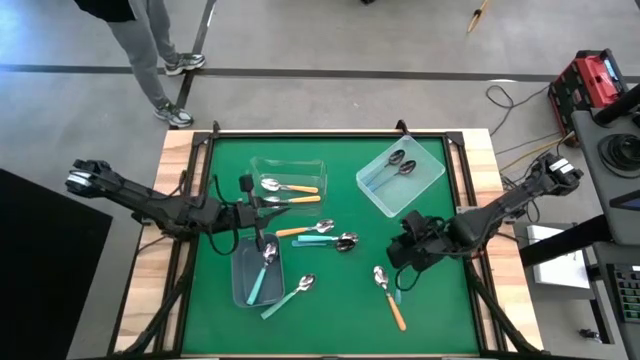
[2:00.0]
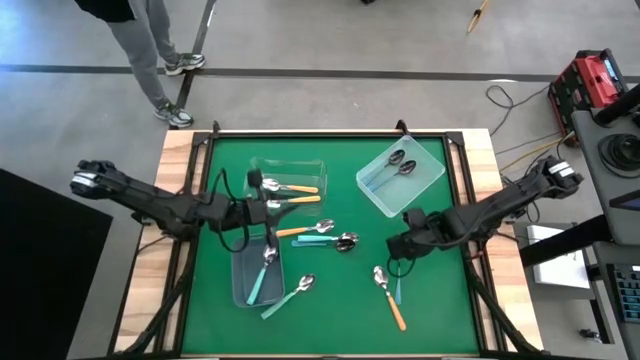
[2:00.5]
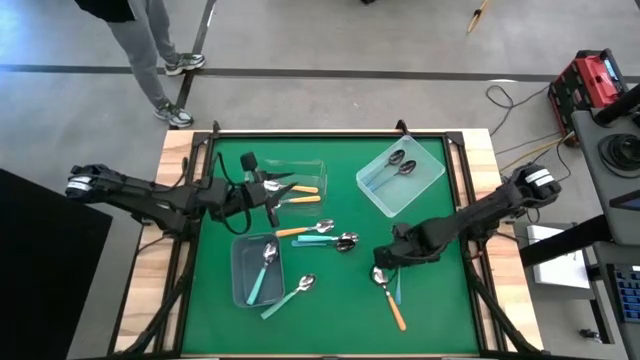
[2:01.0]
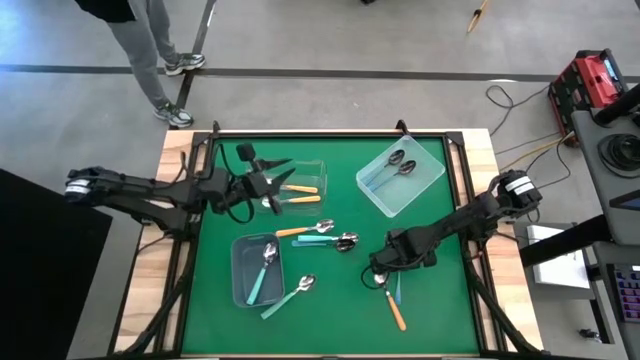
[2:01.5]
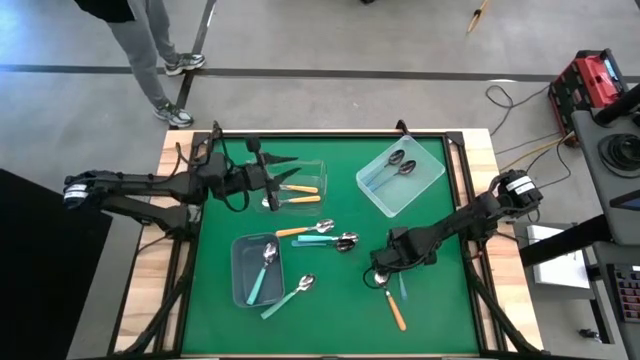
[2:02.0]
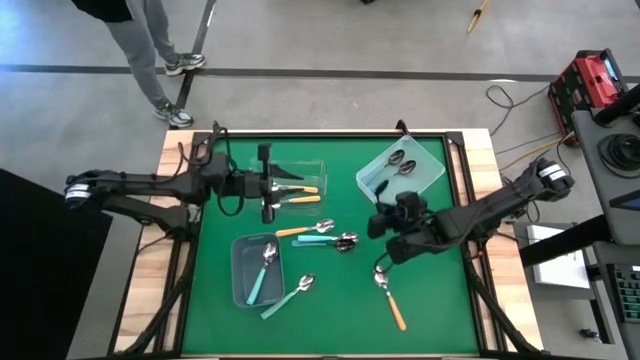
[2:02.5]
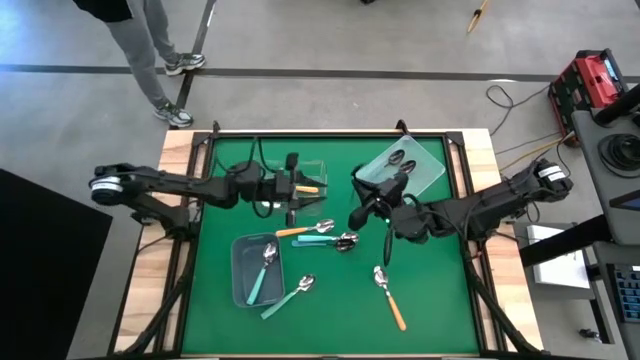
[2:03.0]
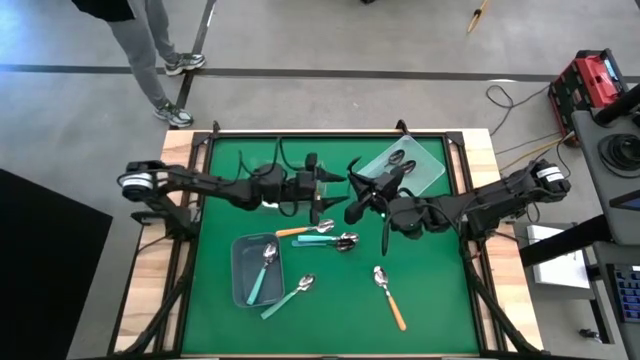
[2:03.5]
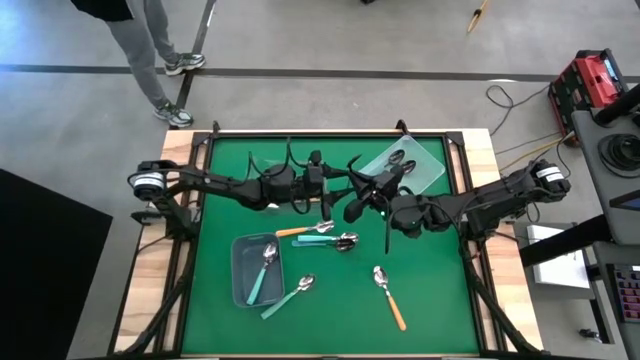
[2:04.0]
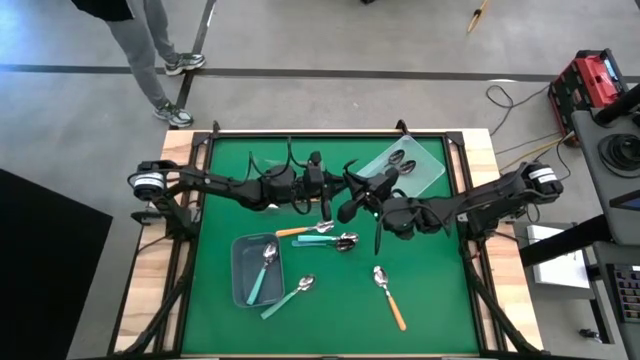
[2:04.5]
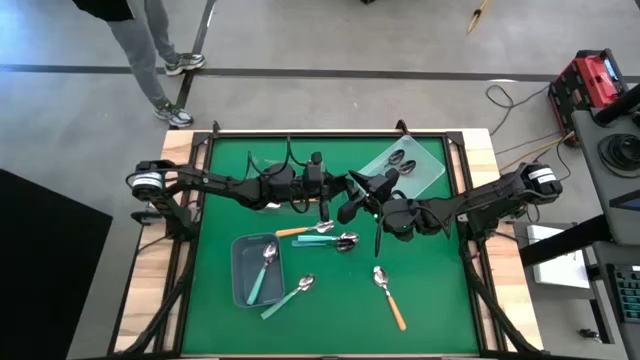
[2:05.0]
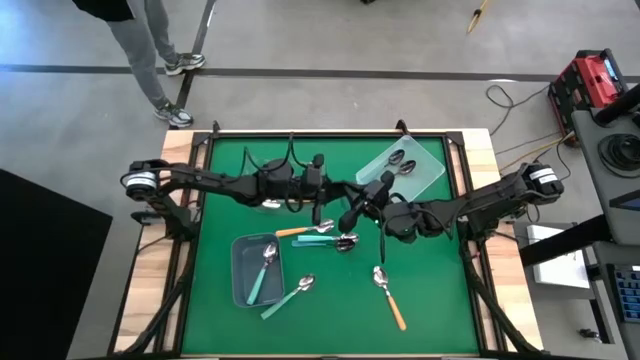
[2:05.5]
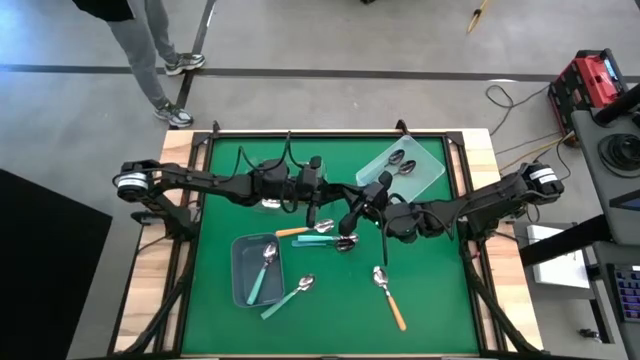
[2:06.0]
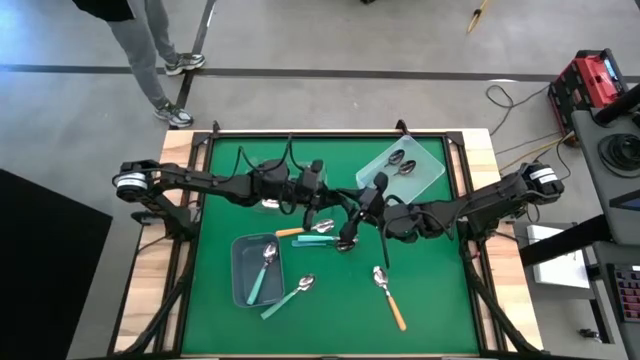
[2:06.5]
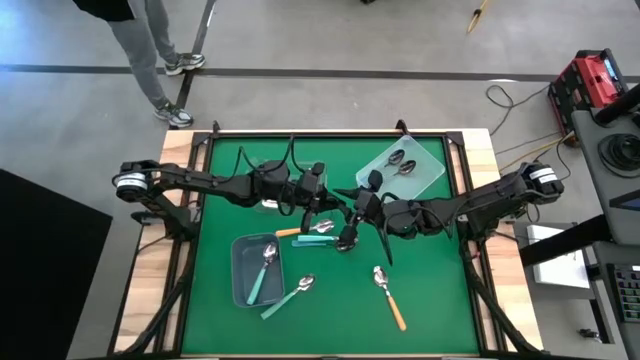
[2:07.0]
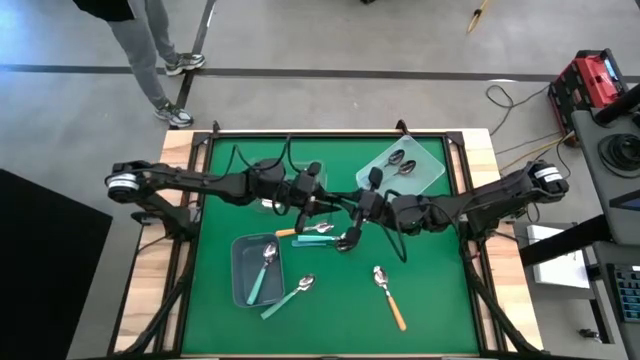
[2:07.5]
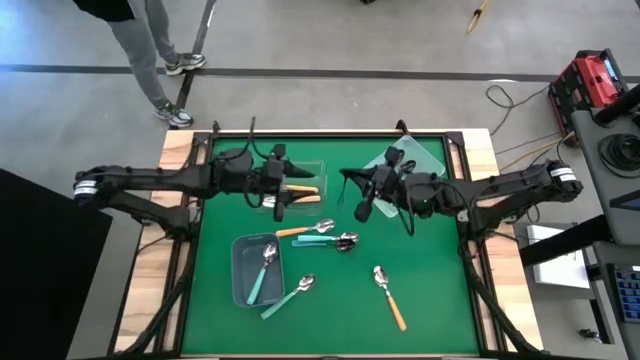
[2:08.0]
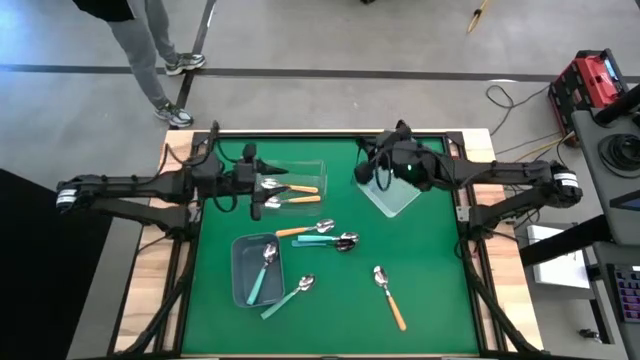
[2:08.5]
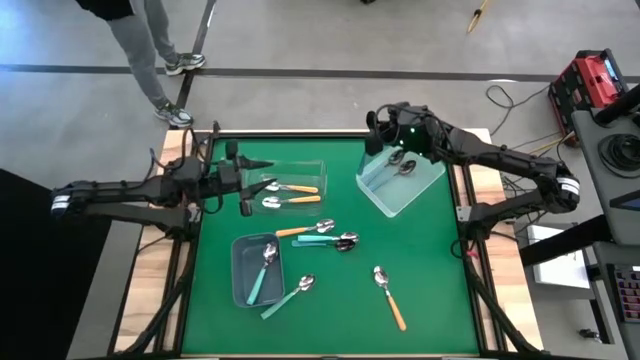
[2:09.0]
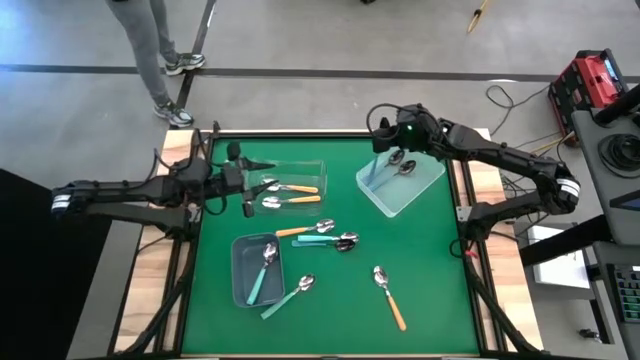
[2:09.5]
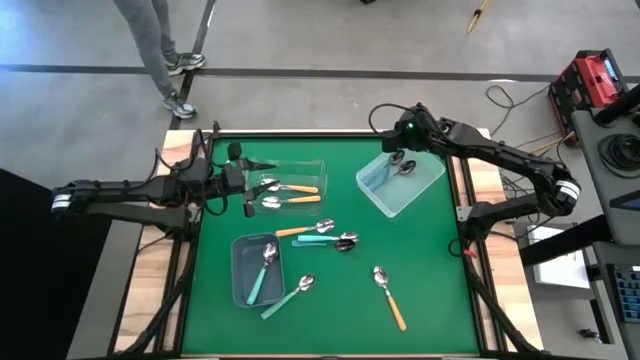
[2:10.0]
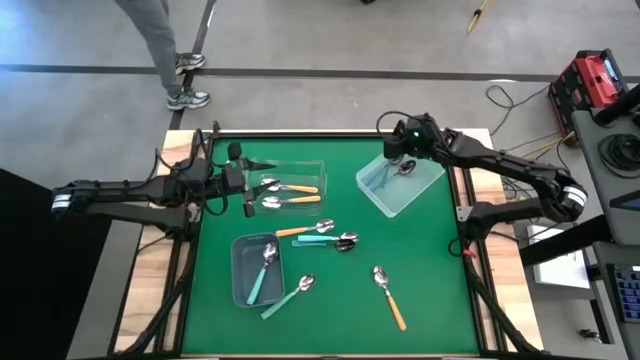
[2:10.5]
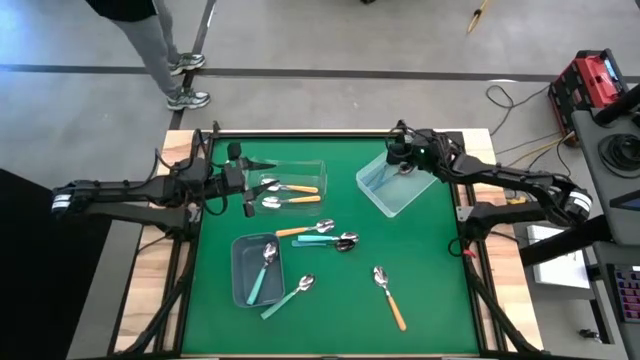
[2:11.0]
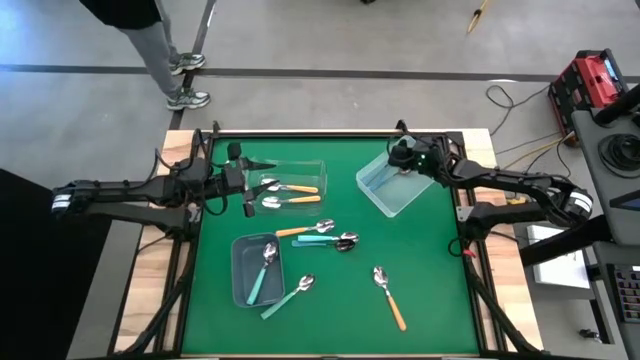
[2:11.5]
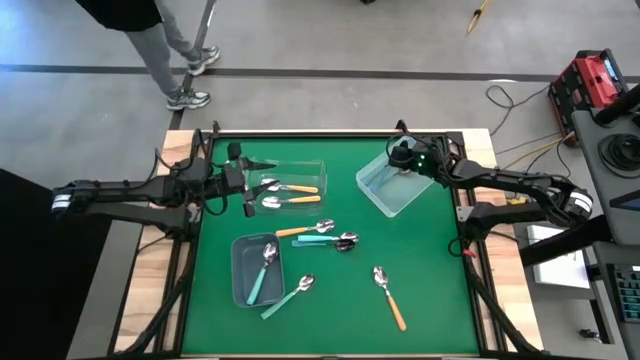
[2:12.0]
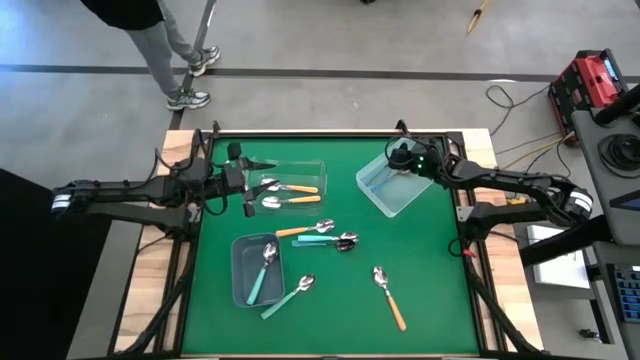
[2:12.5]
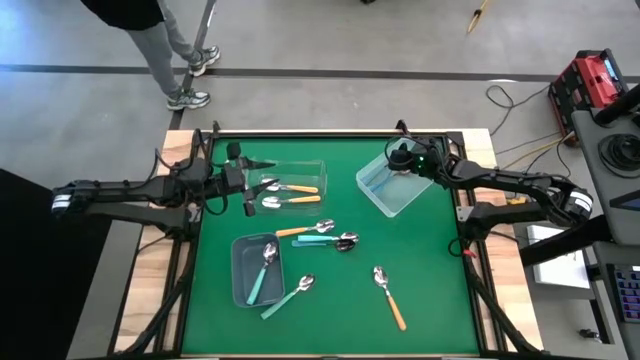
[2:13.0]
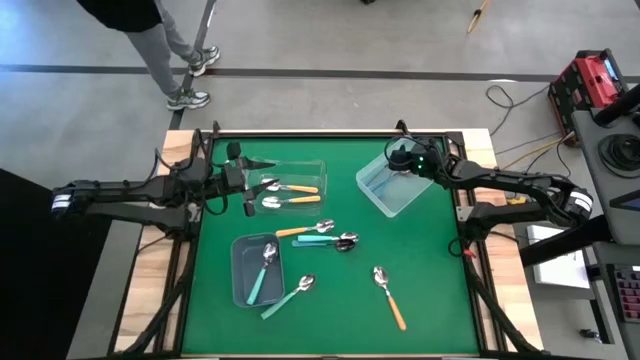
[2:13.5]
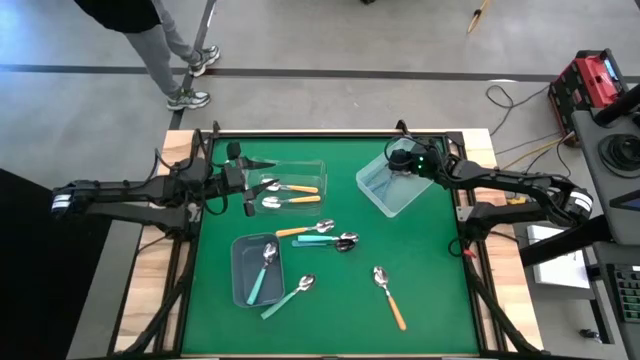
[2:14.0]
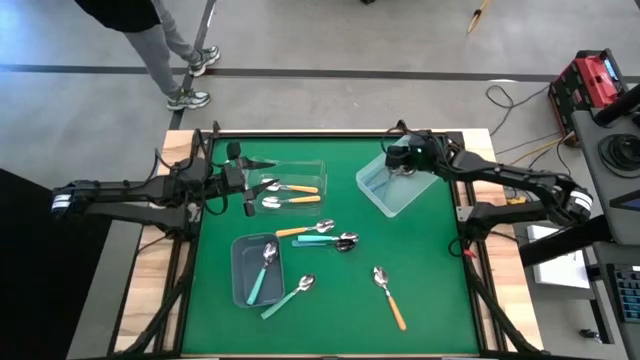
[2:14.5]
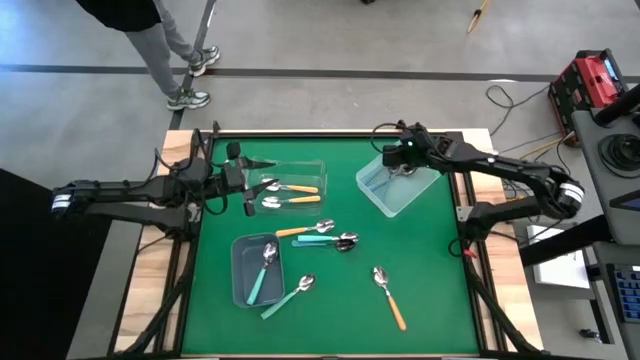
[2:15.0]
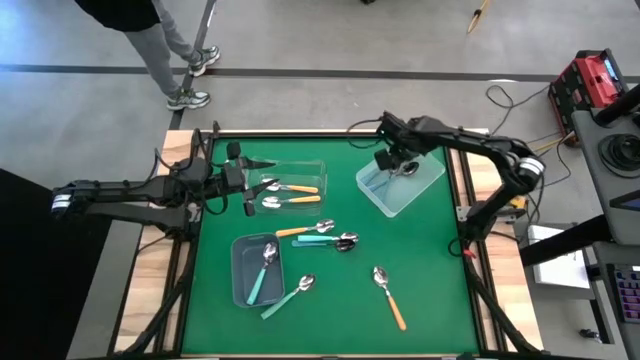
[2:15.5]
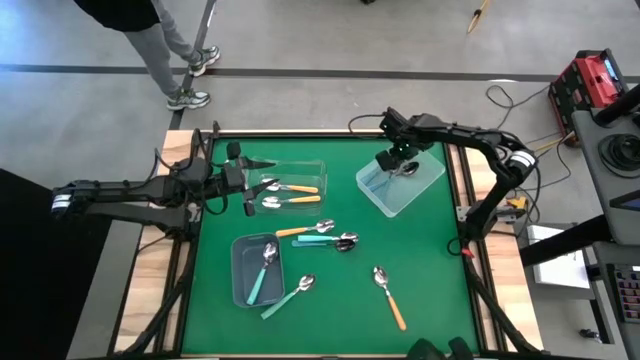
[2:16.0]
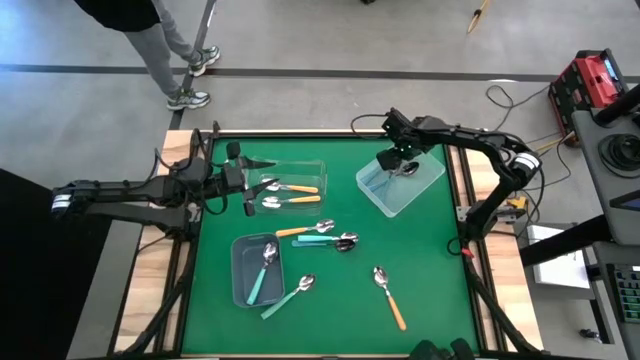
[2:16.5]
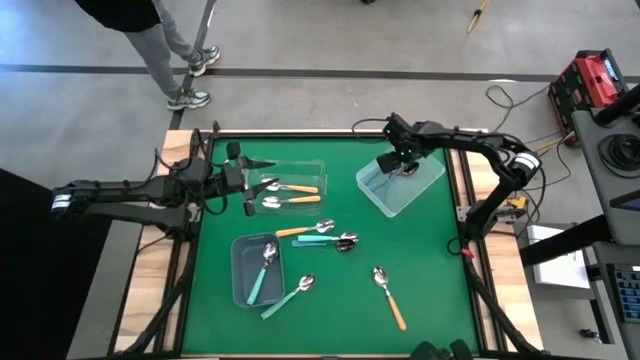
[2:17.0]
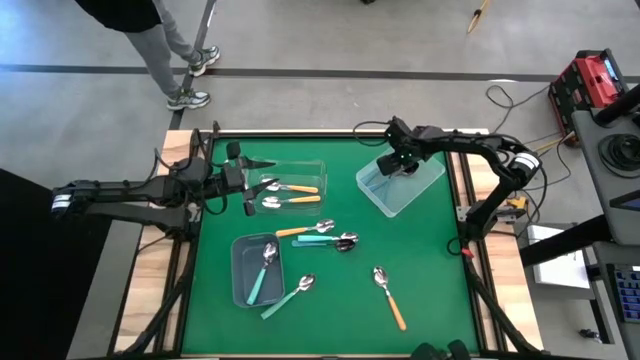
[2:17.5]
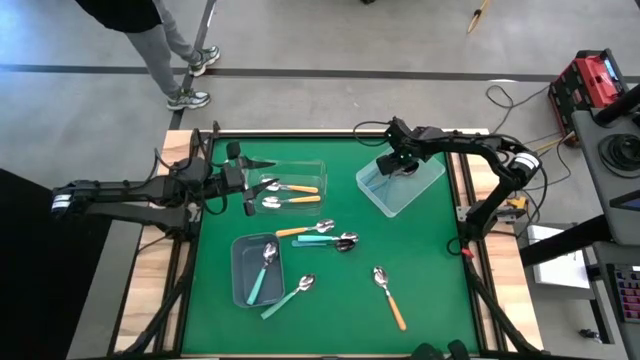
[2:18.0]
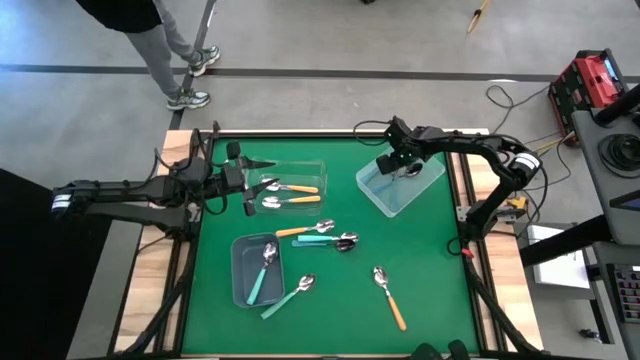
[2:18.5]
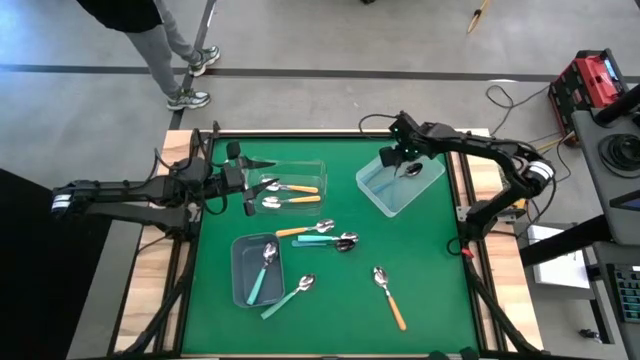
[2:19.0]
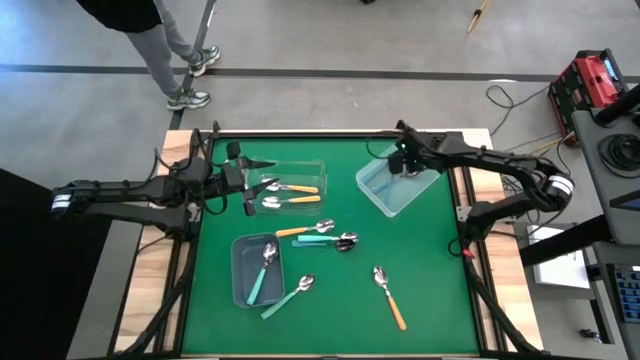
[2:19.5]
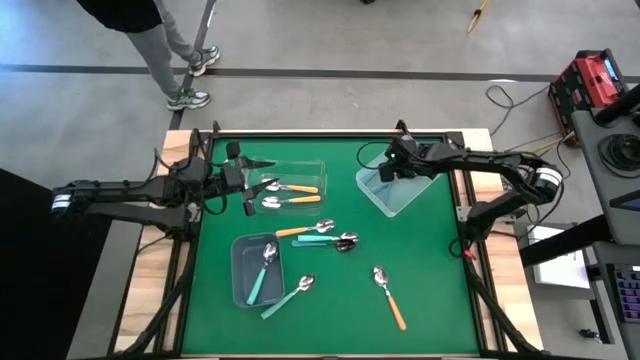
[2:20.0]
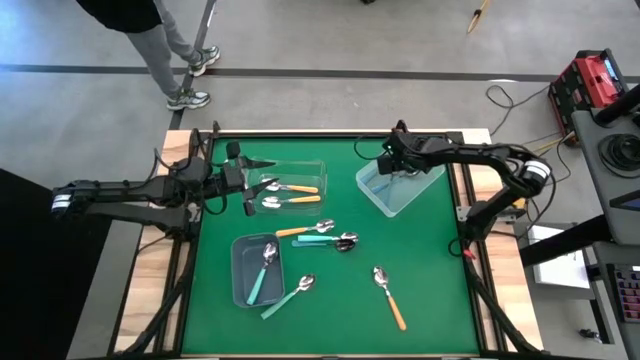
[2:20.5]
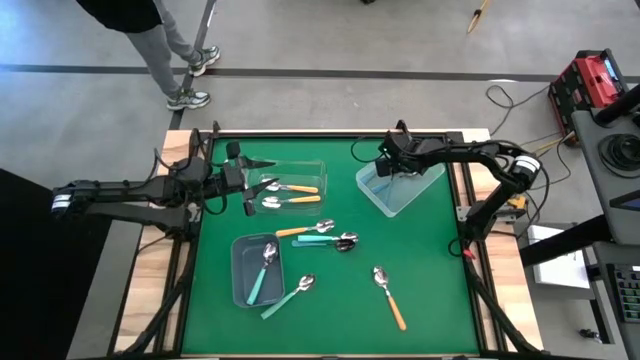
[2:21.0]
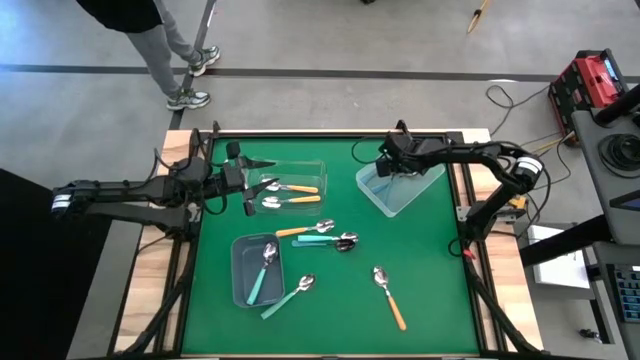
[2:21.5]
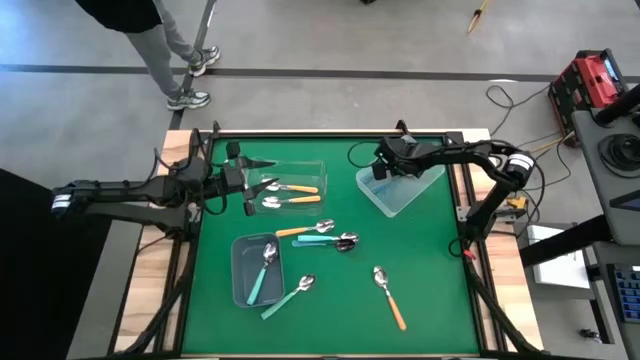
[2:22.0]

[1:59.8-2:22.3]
Task: Sort silverware by color (type)
Put the blue spoon into the white bin
